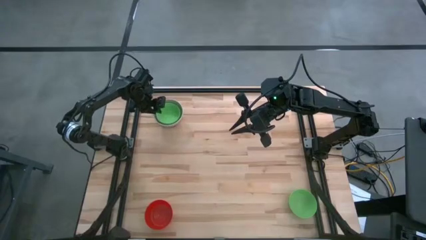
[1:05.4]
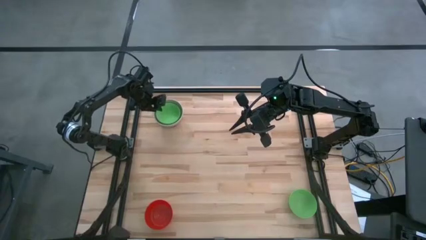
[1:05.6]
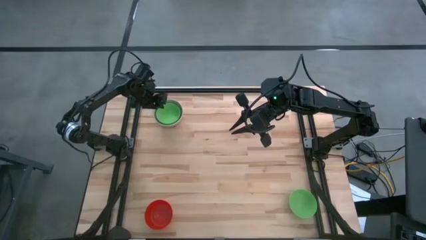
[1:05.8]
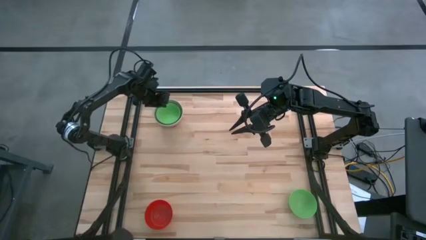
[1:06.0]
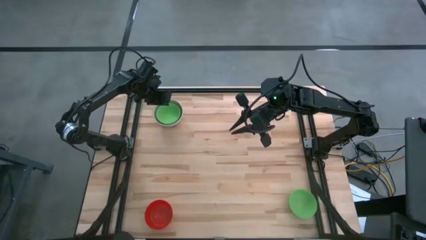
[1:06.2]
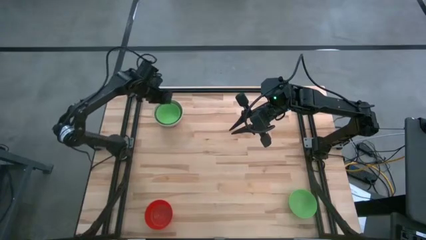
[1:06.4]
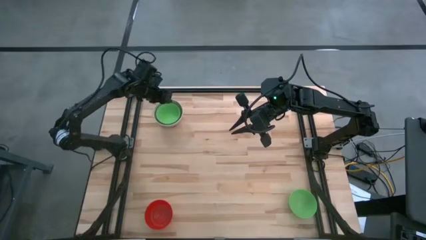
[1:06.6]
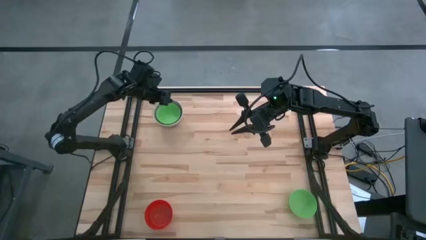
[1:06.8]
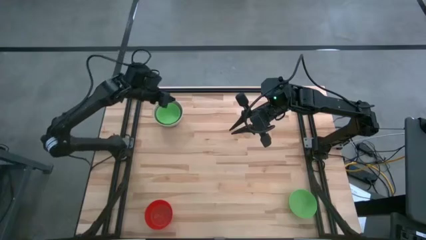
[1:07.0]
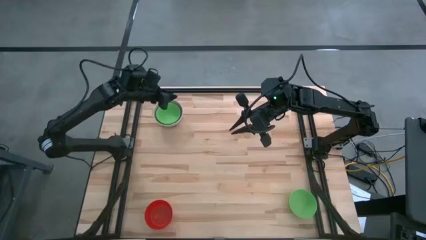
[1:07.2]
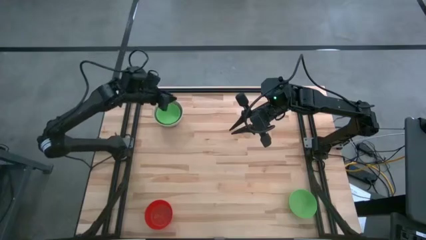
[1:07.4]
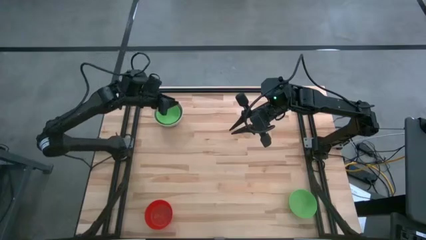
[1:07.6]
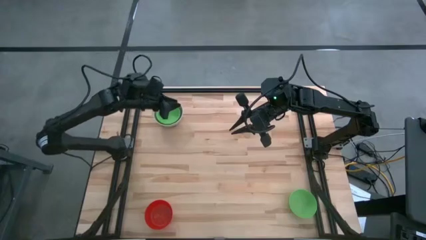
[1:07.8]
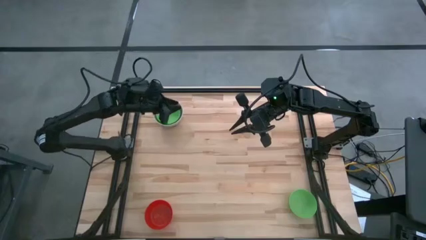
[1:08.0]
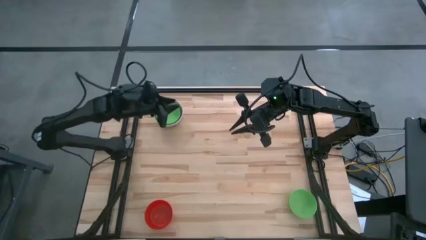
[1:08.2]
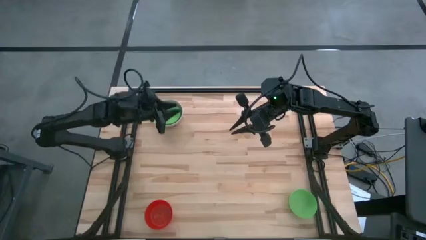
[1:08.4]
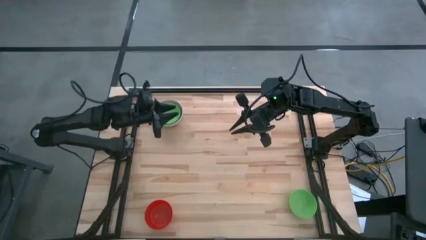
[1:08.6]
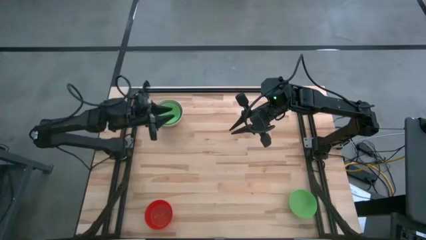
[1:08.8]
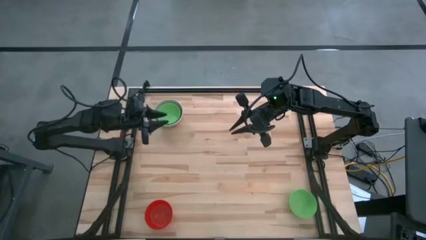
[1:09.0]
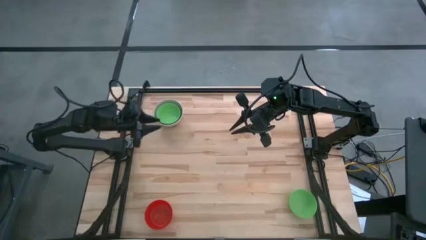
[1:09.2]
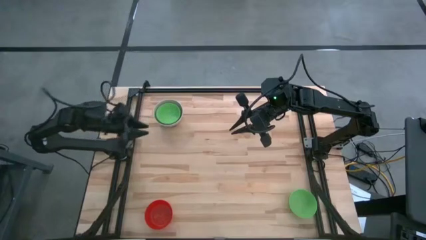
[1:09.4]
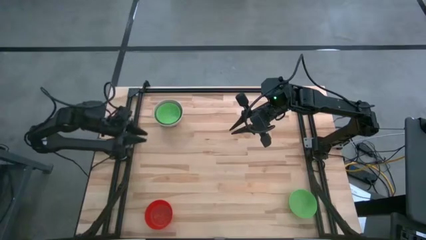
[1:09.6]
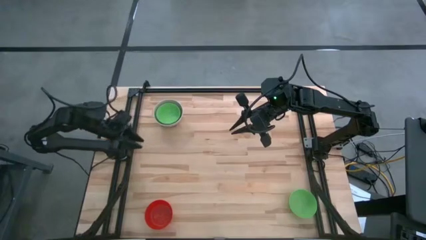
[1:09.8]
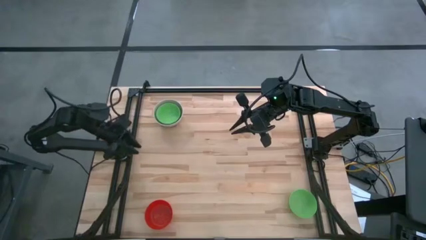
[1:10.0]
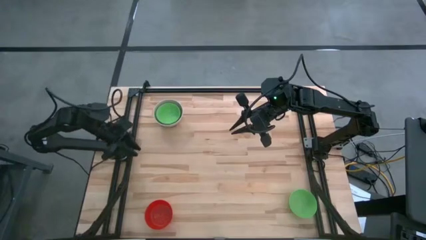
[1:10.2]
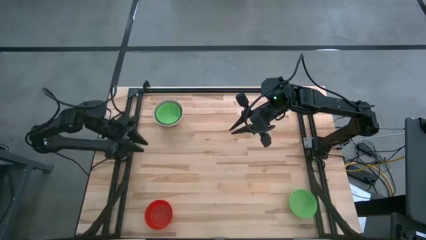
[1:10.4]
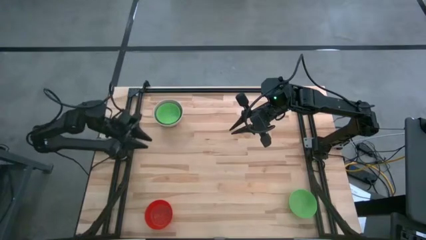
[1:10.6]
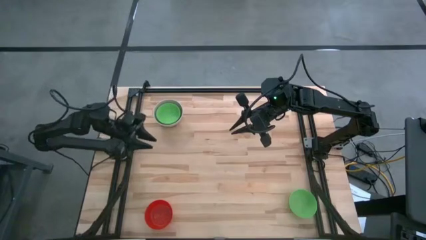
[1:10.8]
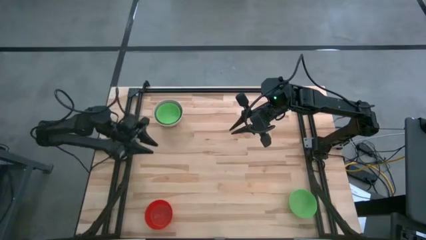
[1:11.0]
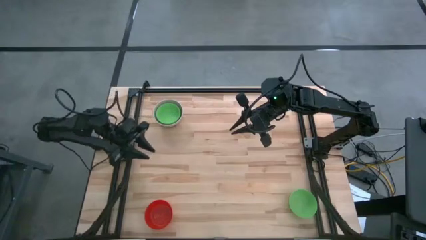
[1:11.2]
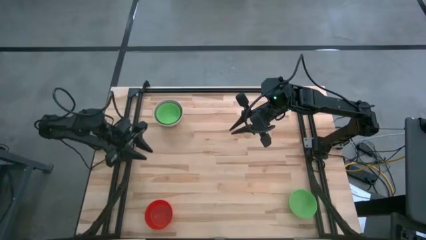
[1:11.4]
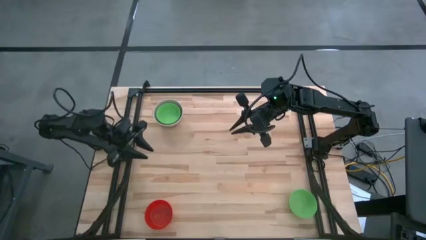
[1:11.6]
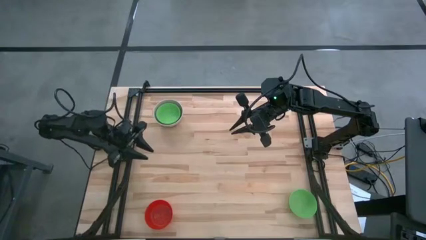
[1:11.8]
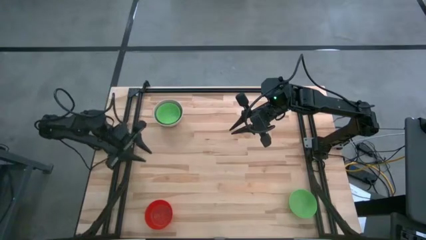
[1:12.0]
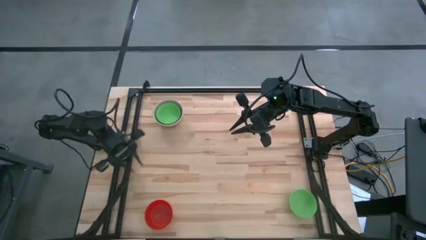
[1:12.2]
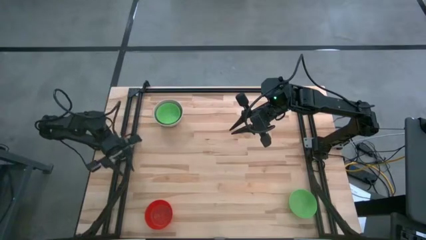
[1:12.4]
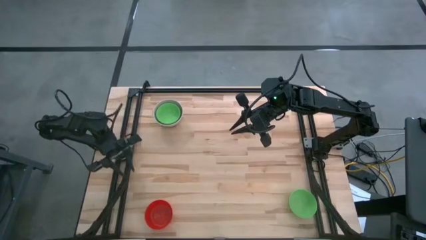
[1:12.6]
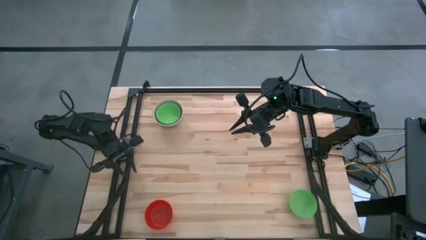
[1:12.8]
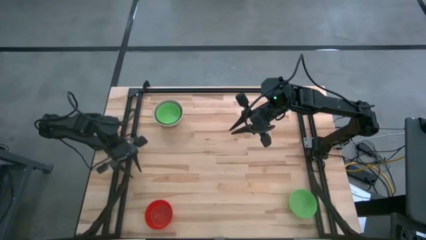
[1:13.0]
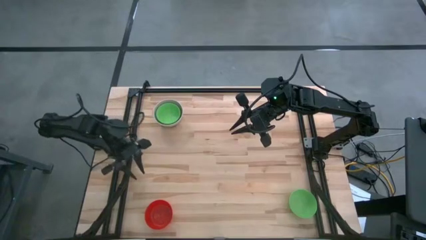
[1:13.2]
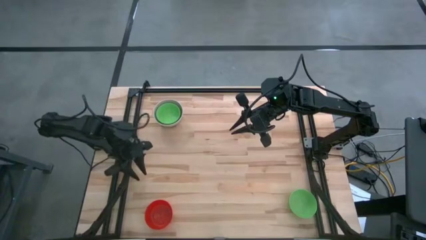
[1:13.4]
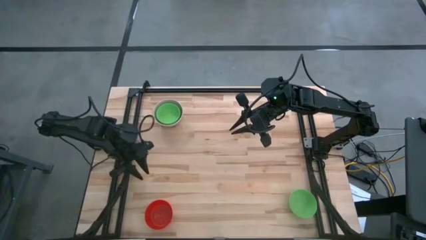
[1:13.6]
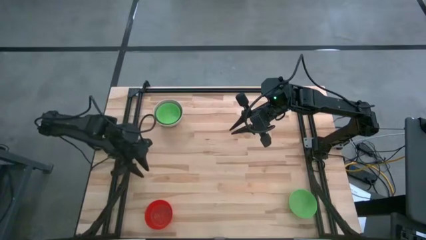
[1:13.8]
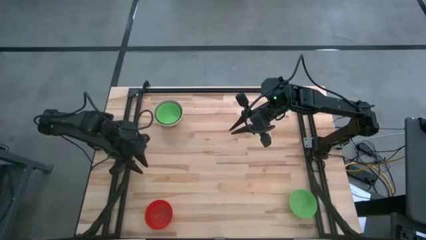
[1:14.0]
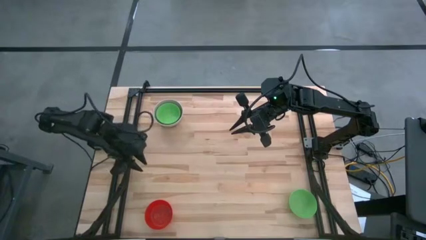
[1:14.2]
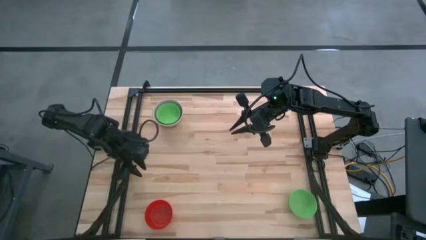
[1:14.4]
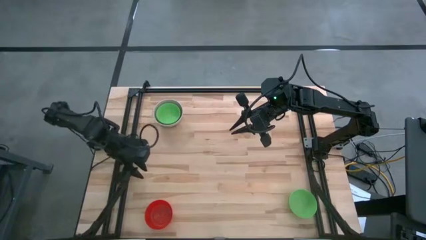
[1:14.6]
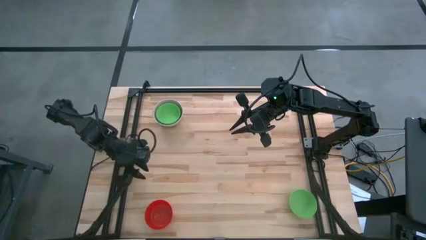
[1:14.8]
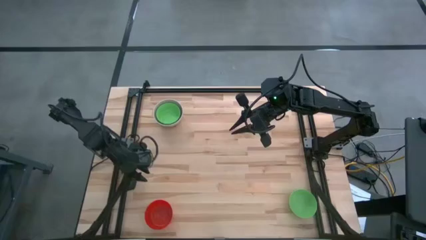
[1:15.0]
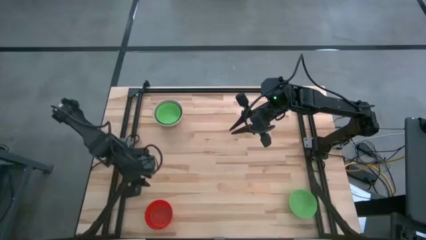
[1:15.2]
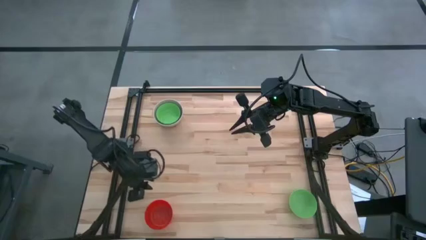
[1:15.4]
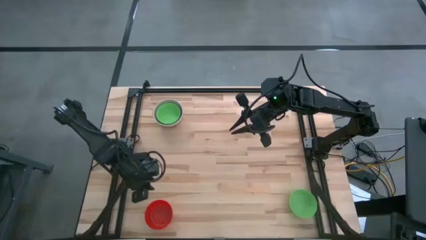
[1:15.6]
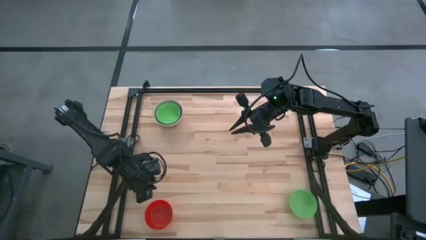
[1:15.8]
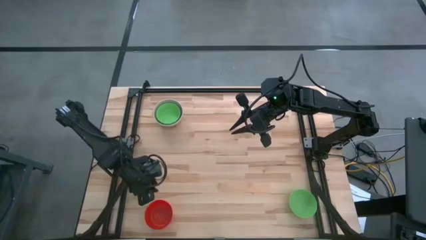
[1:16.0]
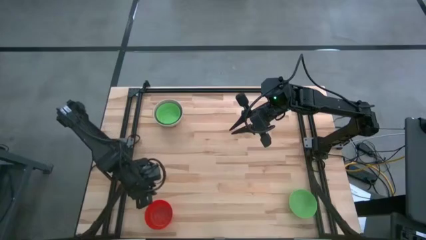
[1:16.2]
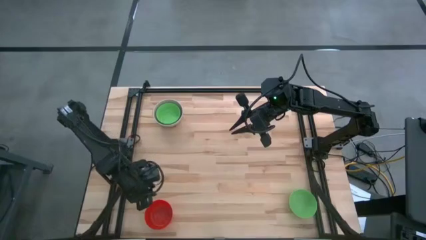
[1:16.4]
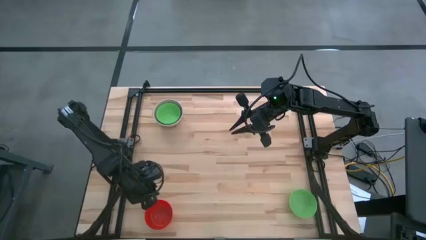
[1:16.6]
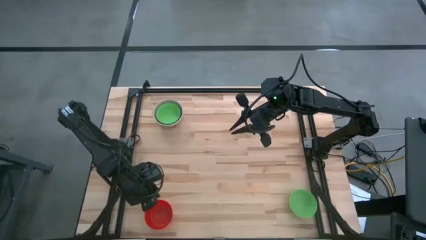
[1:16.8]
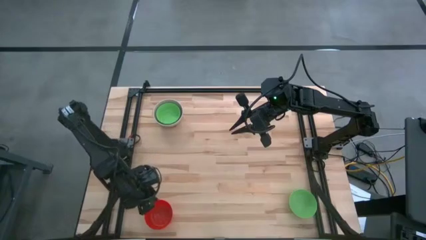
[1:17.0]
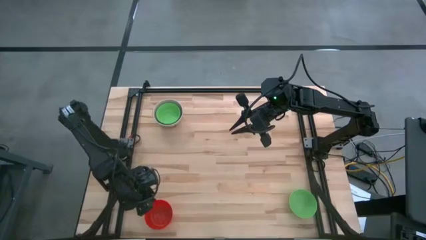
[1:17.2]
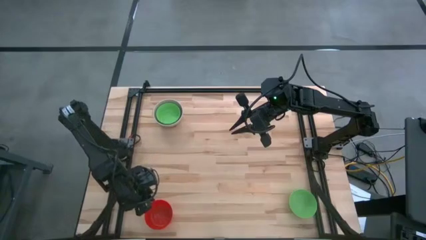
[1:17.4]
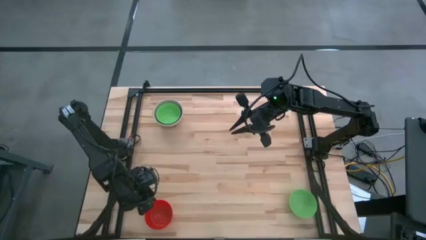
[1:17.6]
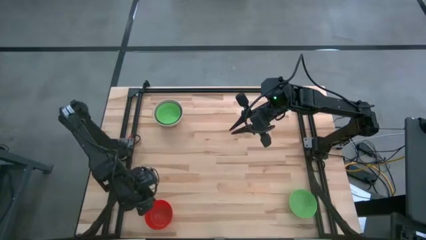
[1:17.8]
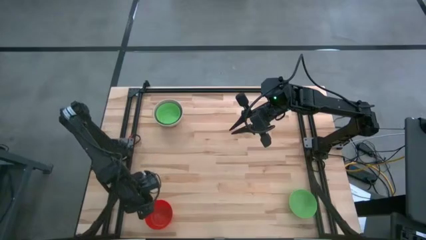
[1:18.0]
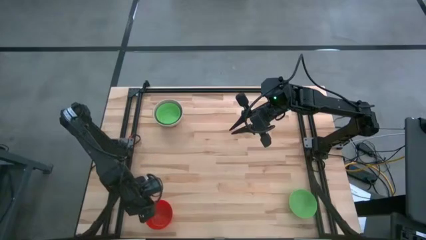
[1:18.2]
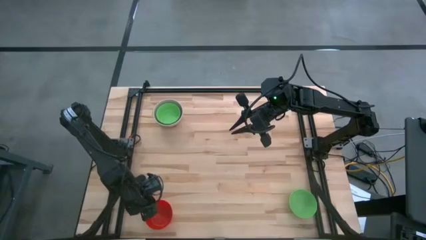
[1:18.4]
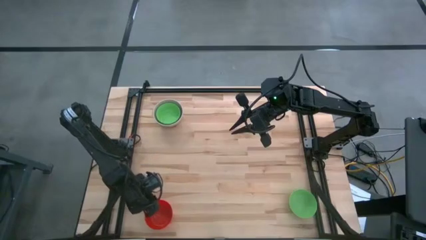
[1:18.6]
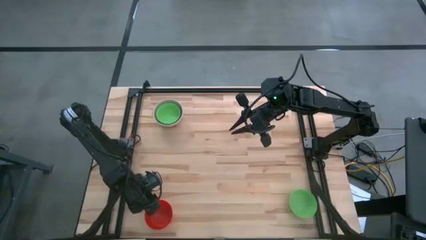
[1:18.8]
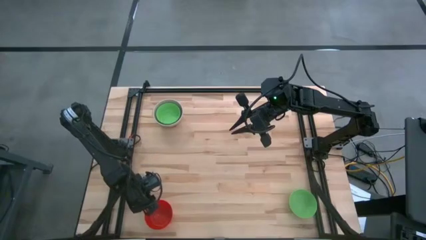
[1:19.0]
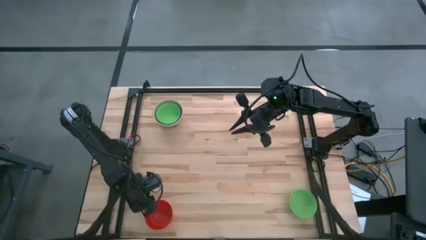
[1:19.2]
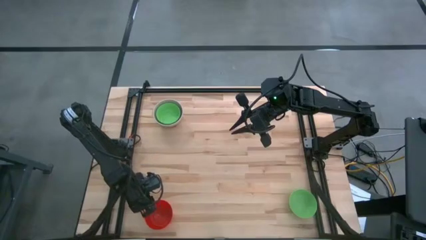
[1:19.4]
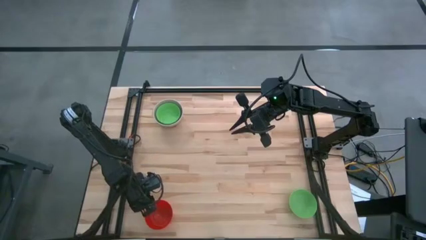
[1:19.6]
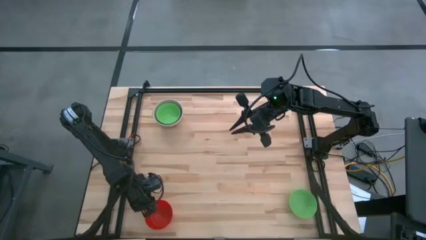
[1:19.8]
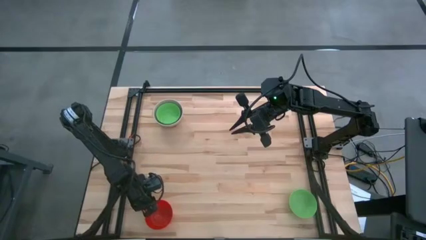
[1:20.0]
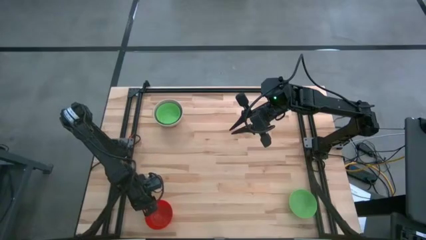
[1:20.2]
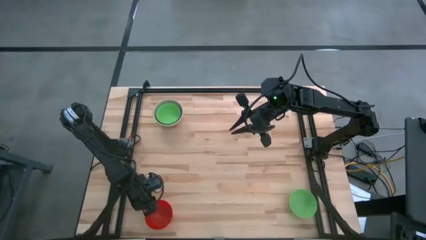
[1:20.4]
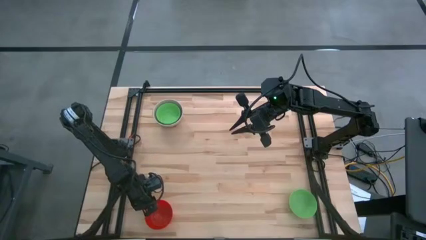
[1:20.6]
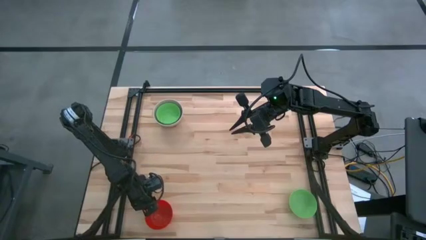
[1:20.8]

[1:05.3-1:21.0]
Stack the red bowl on the stacked green bowl
